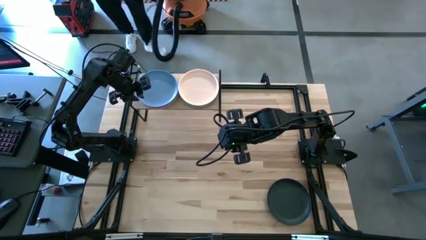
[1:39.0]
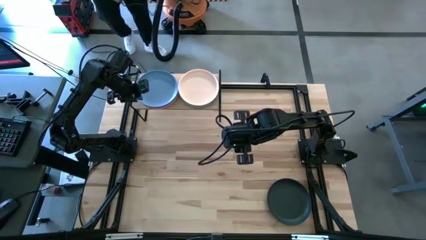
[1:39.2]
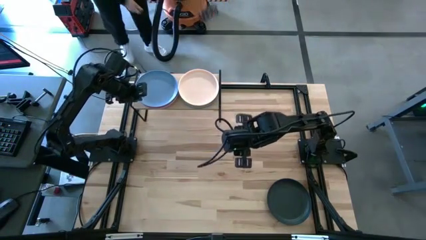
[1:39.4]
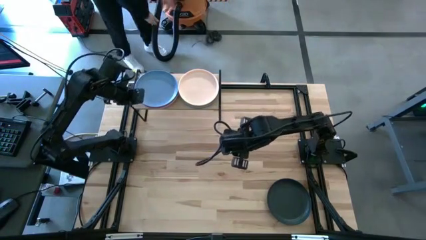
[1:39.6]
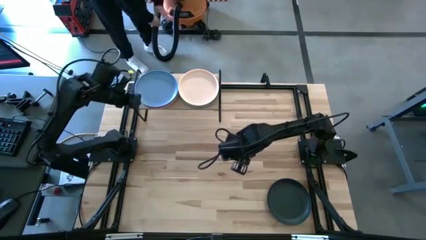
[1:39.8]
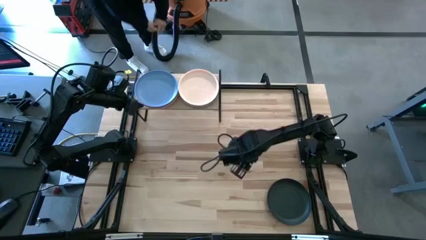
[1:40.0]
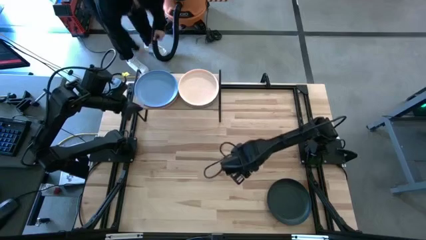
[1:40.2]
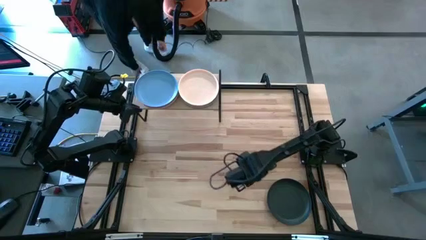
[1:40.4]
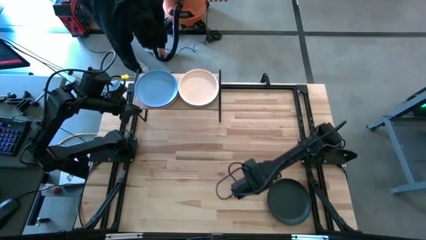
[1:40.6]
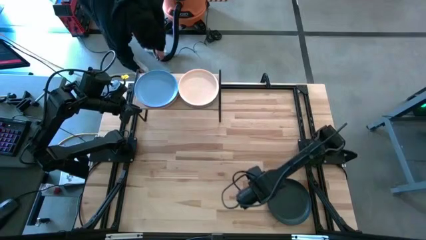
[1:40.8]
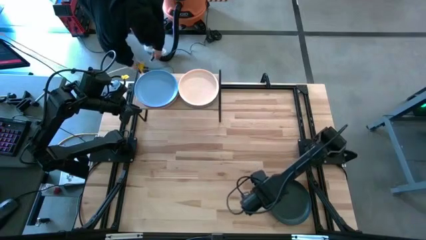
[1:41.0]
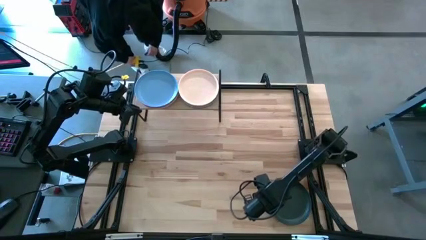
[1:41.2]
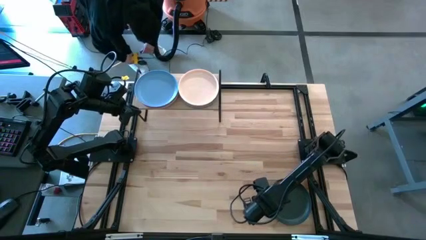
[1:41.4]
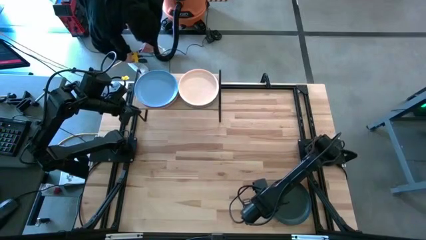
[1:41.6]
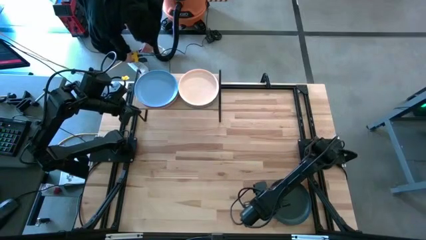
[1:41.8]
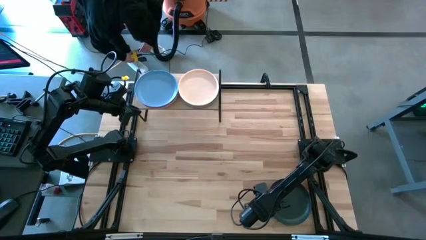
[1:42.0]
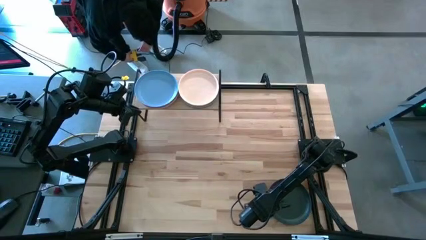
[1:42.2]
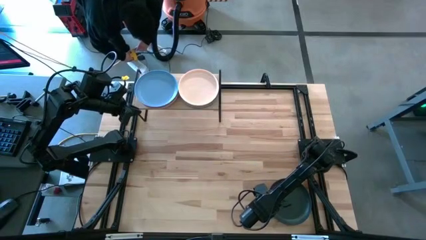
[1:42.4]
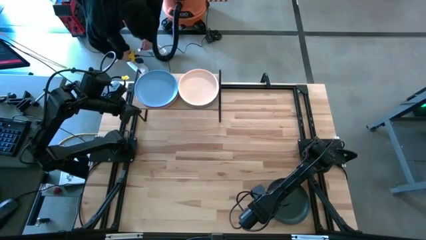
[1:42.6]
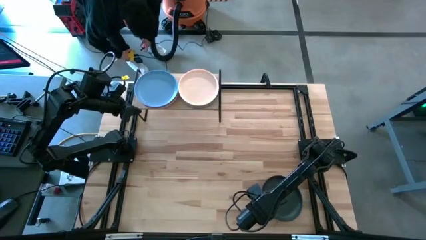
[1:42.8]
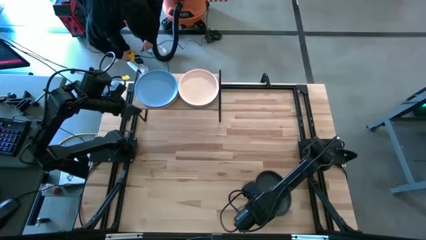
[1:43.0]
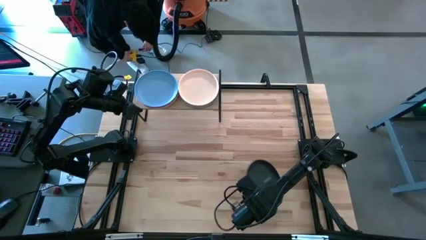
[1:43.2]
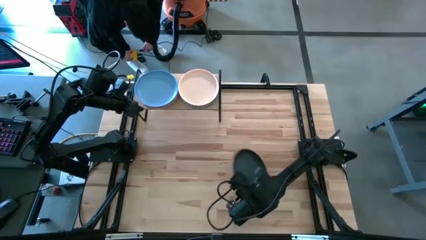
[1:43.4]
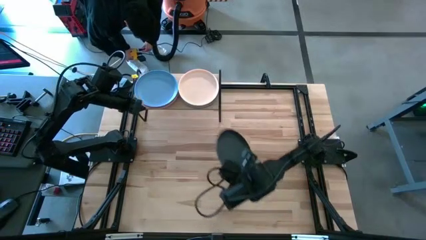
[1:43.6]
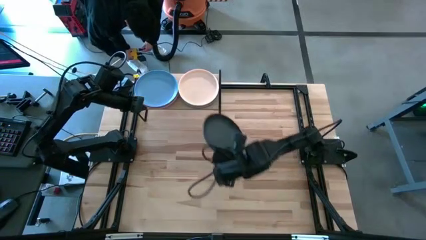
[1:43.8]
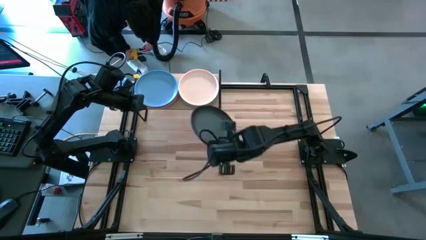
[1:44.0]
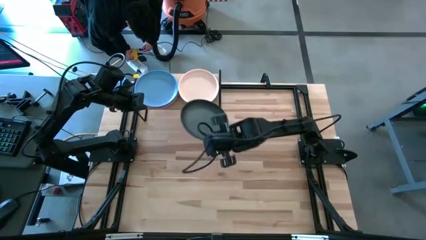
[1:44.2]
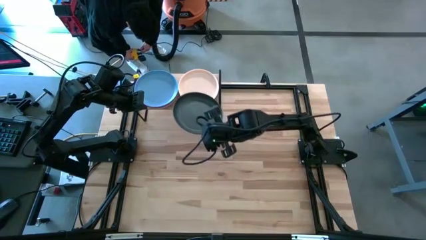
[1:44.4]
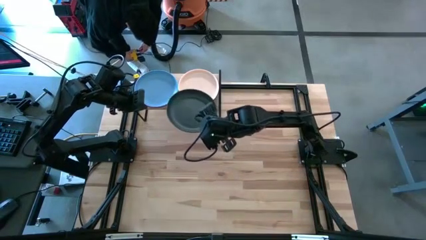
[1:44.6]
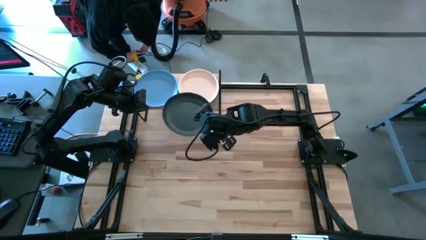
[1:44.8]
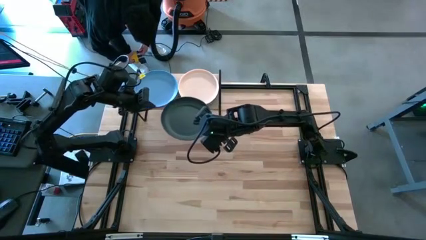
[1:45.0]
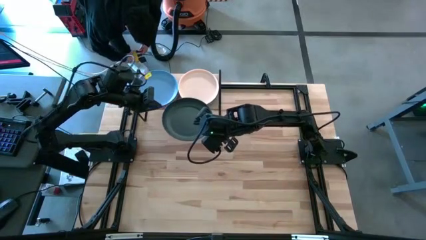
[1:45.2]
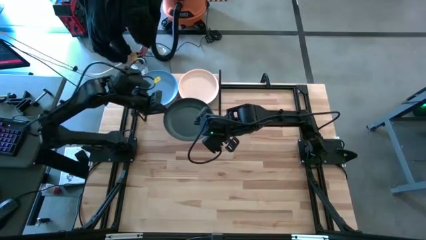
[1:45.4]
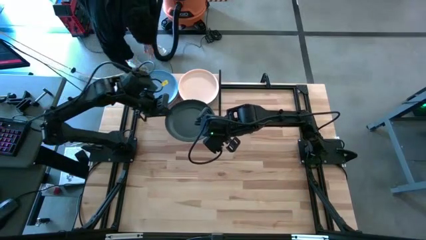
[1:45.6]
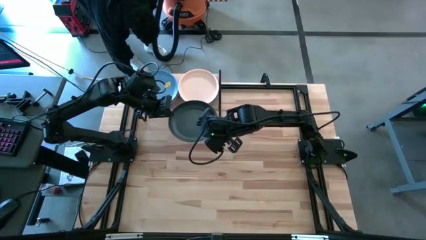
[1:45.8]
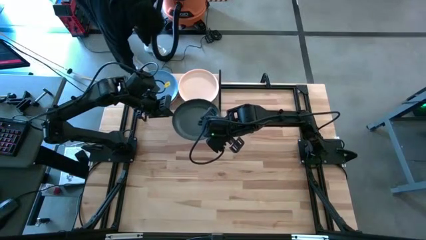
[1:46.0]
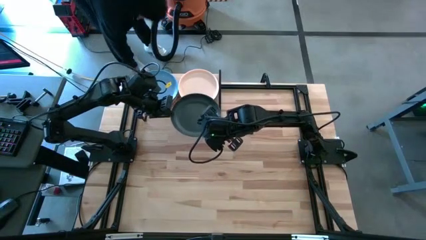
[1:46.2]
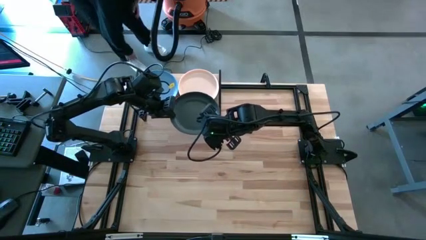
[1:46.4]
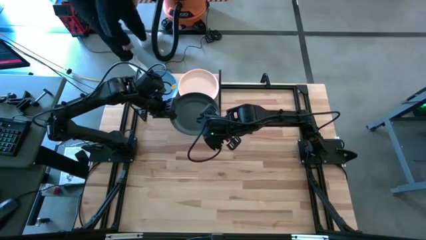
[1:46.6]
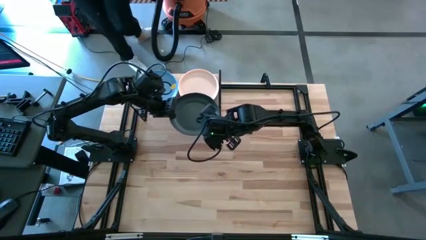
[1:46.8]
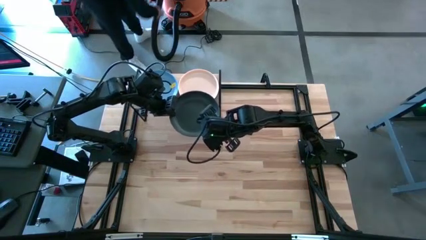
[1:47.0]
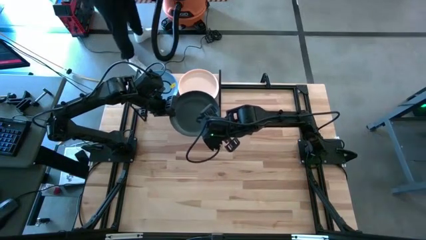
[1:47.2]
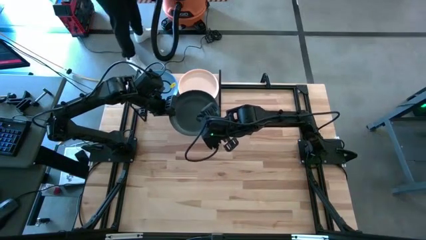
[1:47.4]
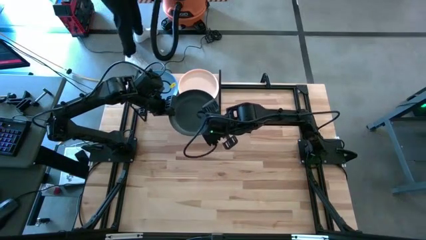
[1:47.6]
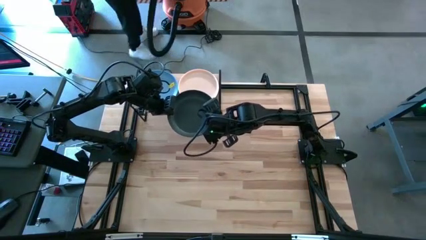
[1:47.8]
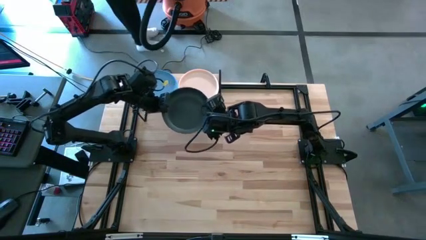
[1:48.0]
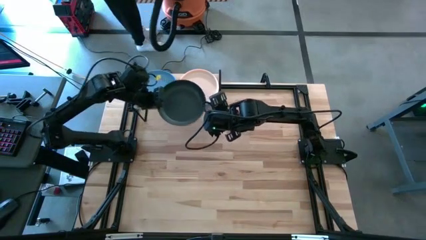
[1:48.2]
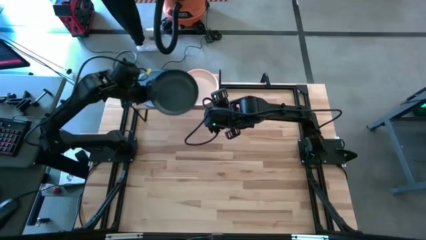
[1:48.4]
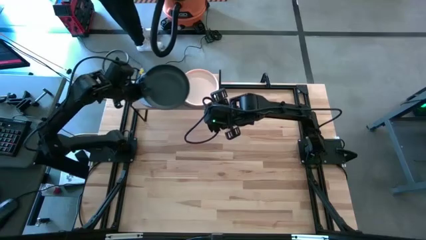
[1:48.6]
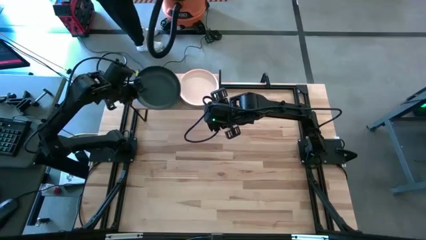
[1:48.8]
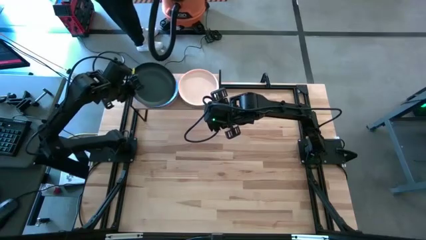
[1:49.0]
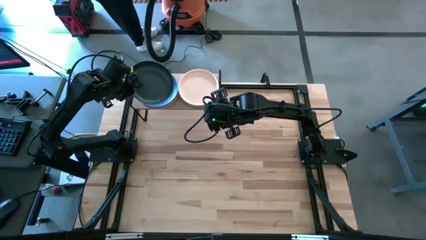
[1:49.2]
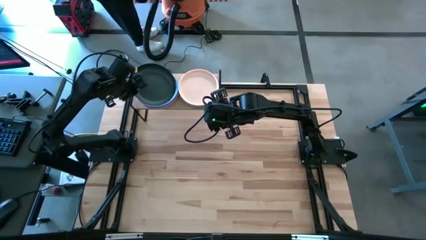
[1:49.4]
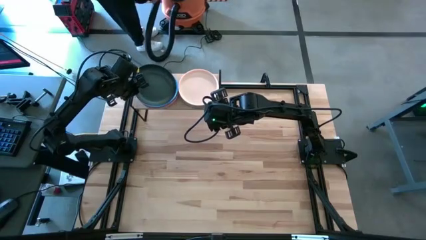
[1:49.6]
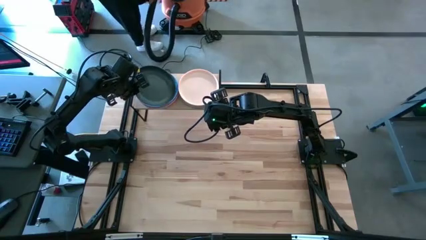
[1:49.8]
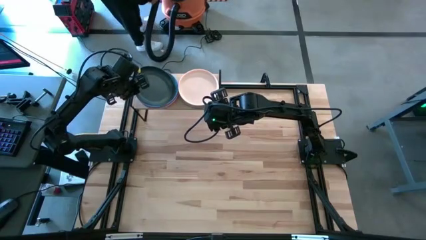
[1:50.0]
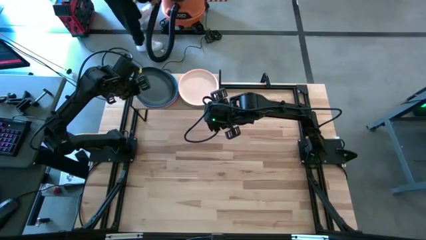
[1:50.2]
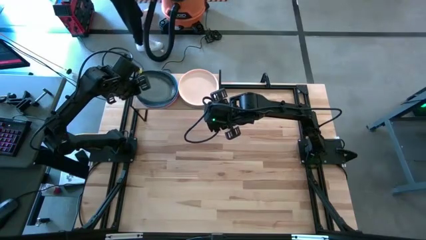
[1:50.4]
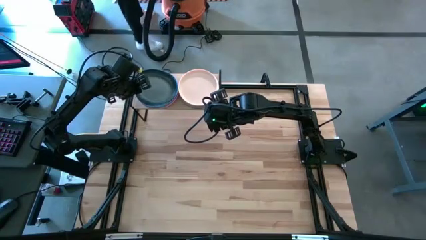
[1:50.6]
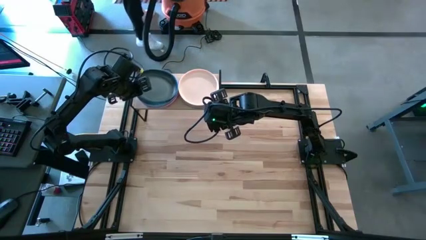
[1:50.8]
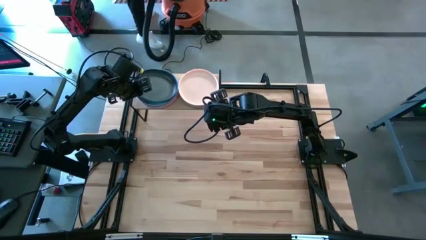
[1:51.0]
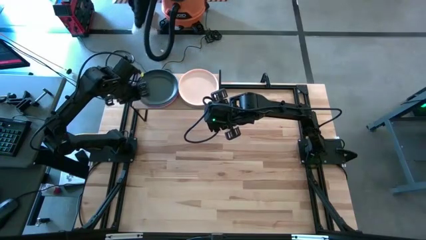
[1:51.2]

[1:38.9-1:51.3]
Task: Place and stack plates onto a shelf
Stack the black plate on top of the blue plate on the shelf
